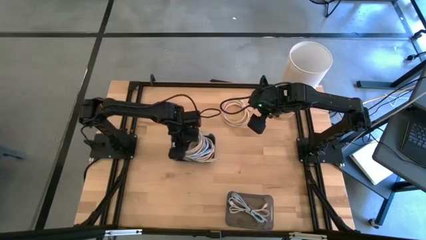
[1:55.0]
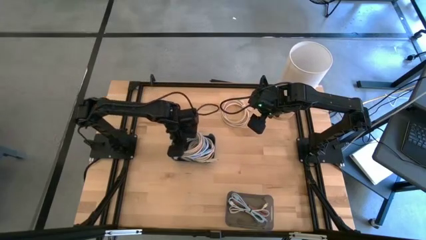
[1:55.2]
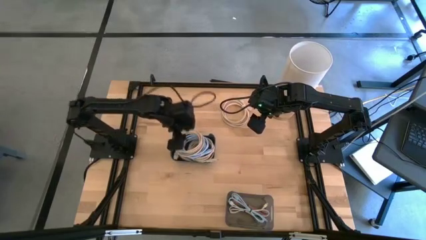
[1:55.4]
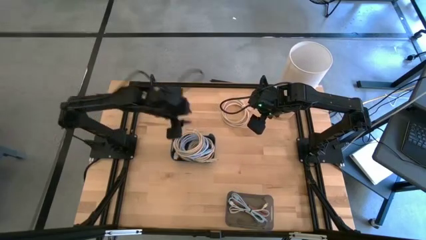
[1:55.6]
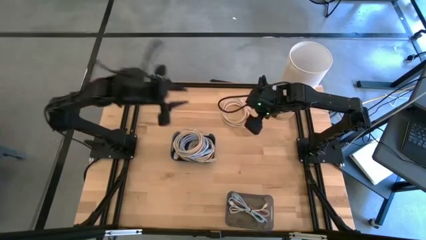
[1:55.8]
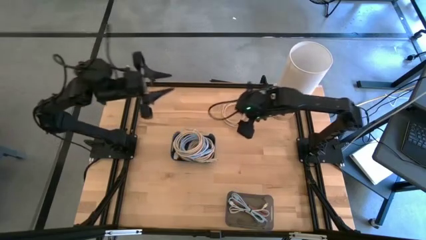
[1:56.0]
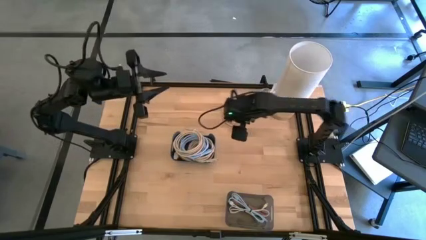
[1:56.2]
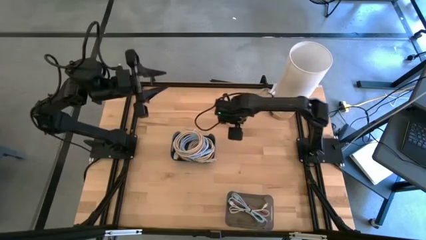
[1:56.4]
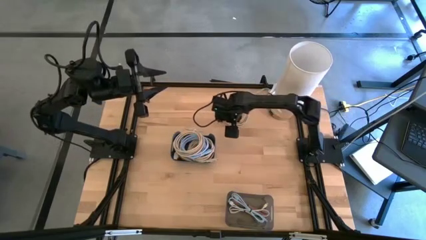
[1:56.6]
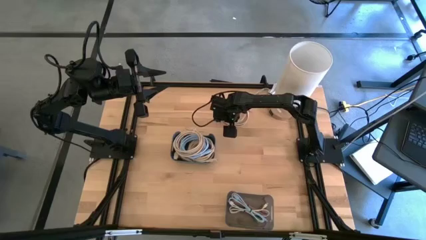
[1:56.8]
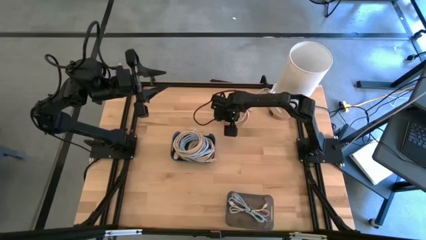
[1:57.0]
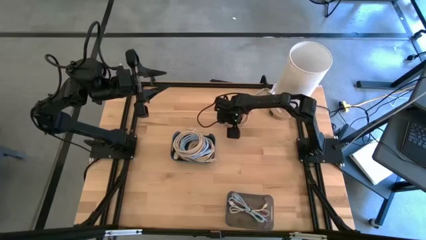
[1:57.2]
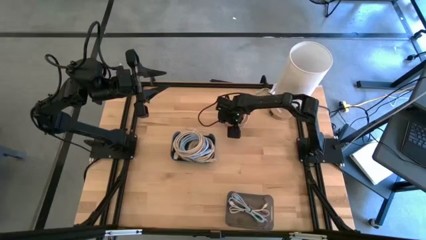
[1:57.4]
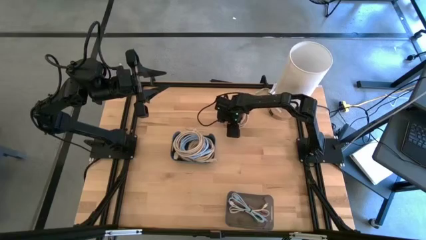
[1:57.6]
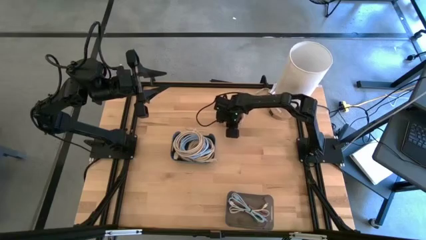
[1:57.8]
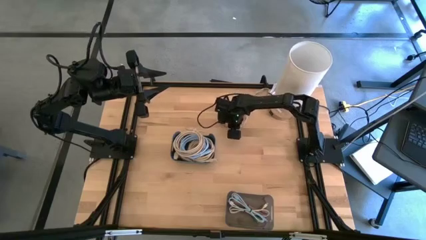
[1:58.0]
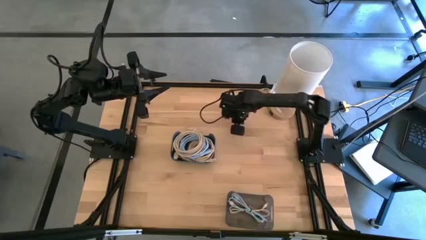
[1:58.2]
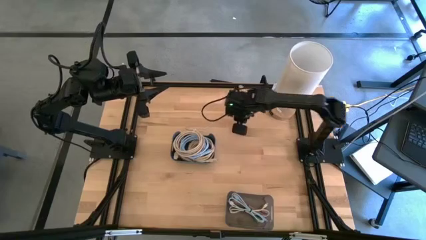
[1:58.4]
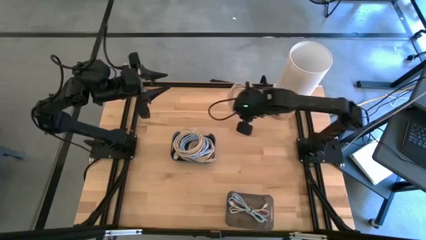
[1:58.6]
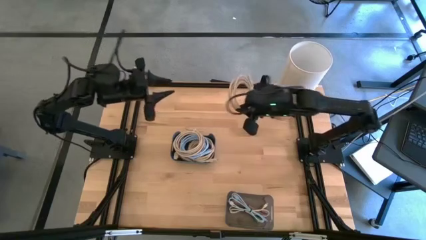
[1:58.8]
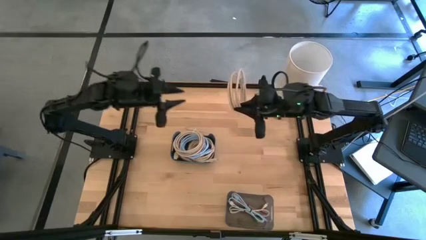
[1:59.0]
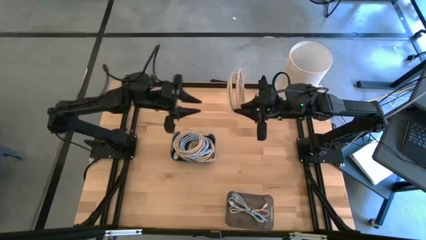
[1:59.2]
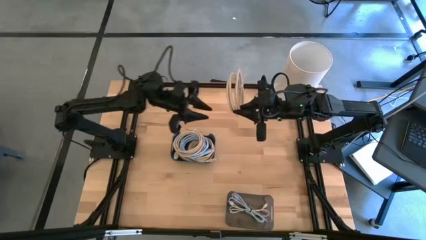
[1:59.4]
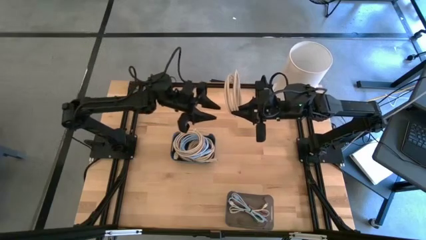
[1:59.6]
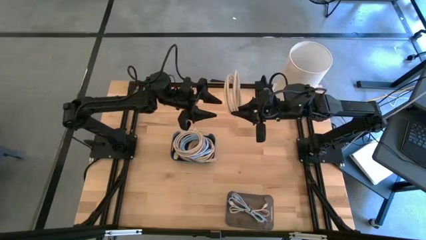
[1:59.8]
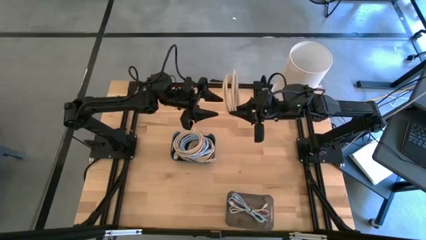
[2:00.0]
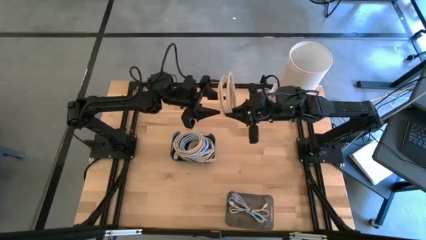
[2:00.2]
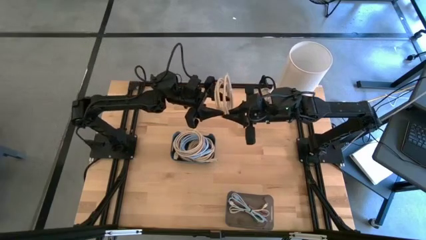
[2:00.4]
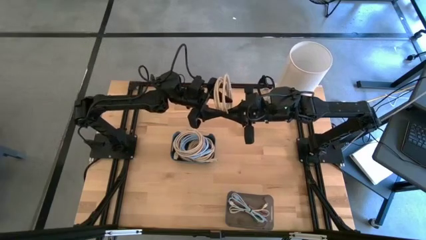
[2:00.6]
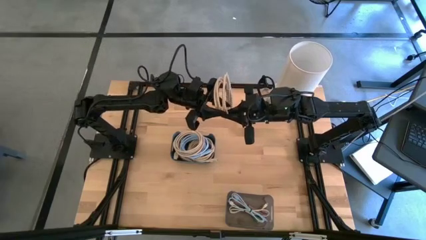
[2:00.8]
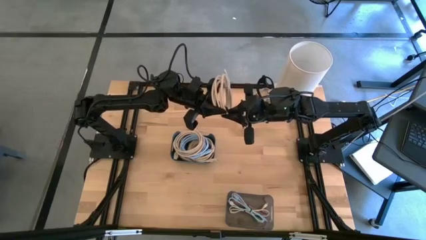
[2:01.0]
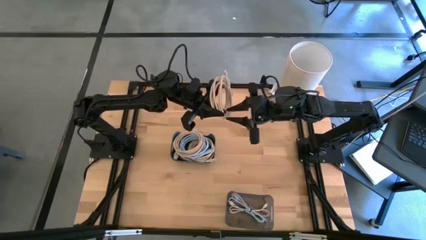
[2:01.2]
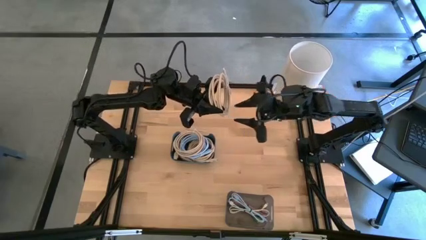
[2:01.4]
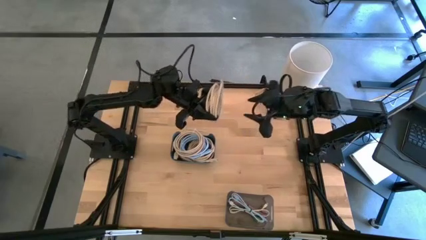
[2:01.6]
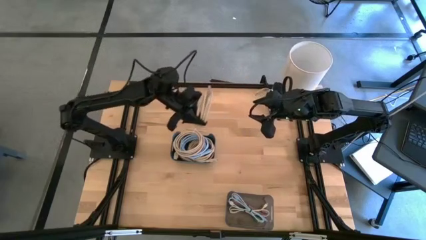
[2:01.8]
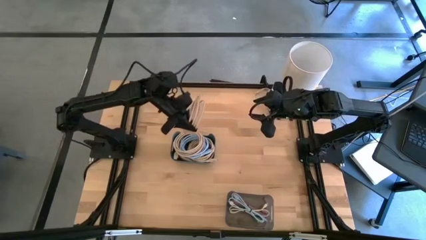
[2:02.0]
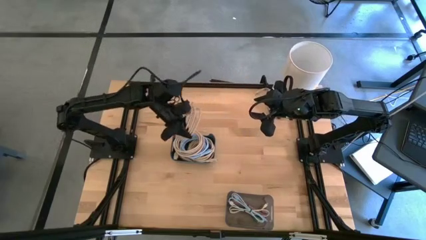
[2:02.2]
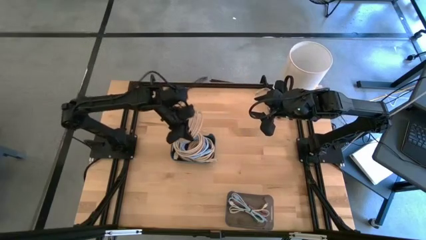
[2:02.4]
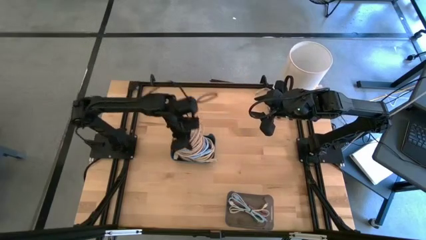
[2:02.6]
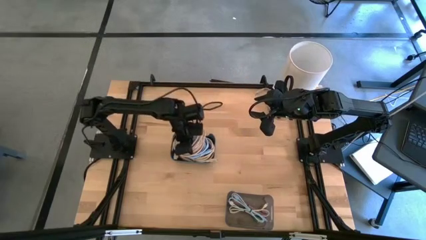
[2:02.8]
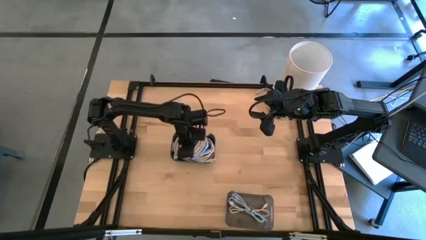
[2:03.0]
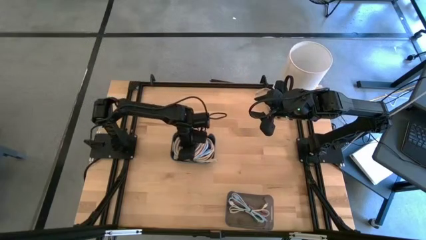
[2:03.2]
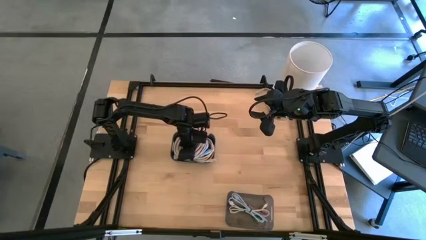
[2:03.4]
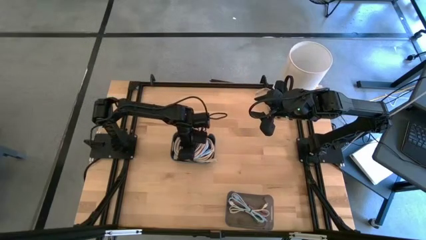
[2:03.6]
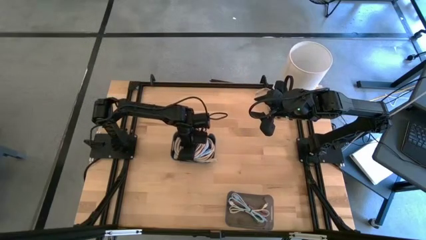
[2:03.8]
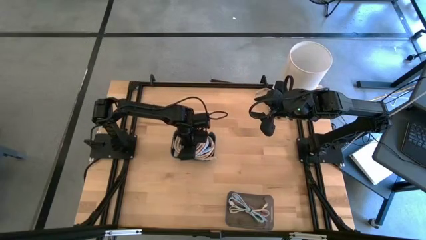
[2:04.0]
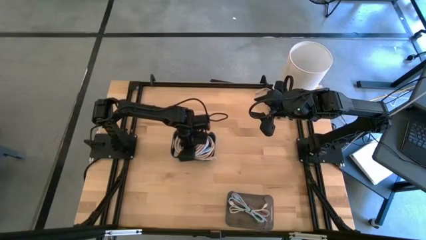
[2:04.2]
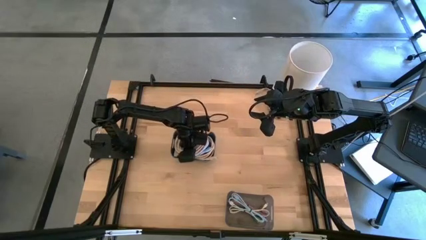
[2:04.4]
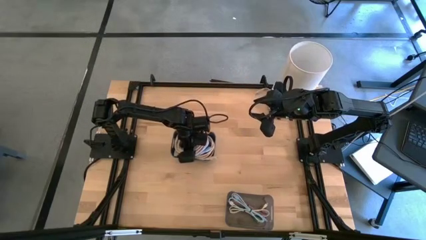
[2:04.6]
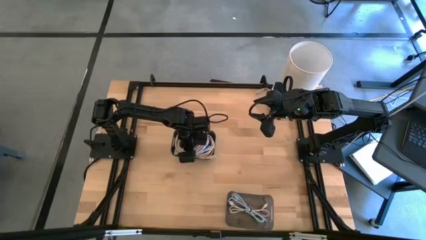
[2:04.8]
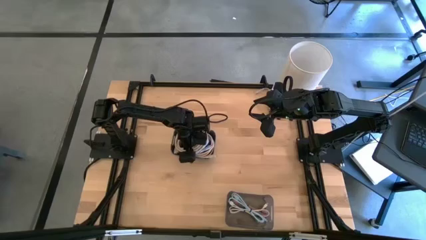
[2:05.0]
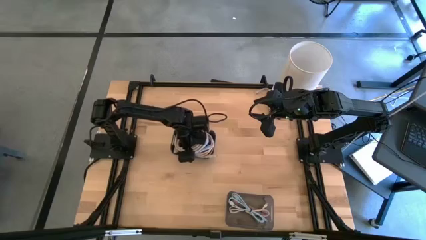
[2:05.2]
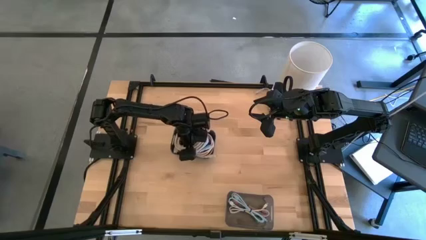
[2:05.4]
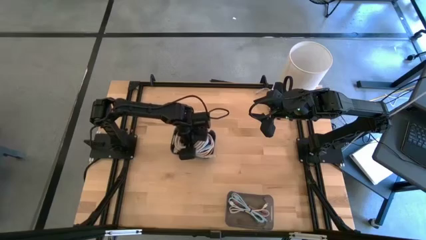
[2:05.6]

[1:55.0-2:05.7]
Put the brown HDMI cable into the blue bin

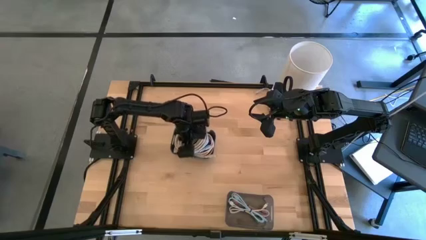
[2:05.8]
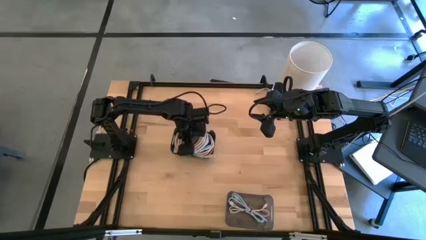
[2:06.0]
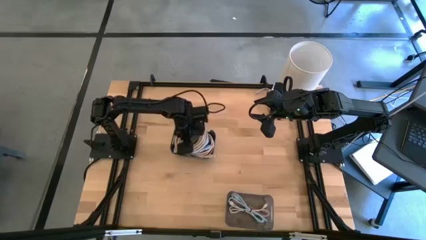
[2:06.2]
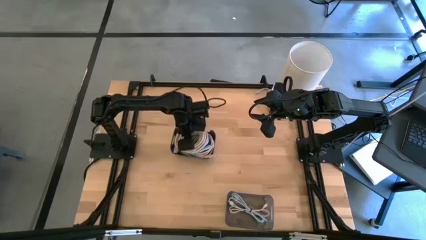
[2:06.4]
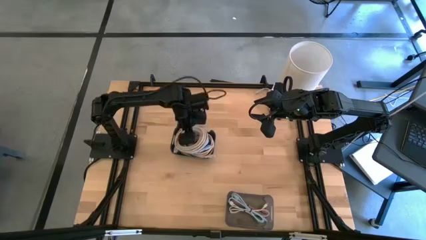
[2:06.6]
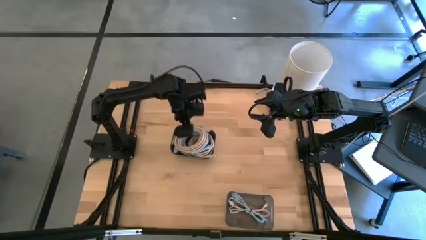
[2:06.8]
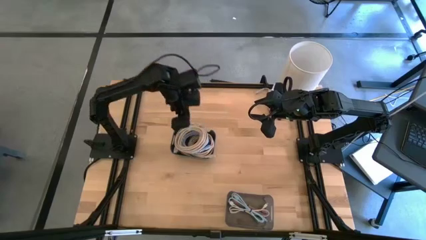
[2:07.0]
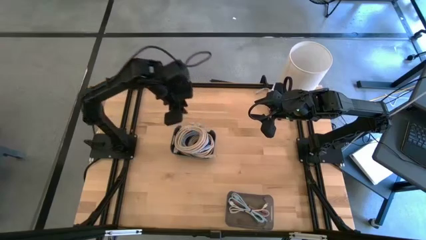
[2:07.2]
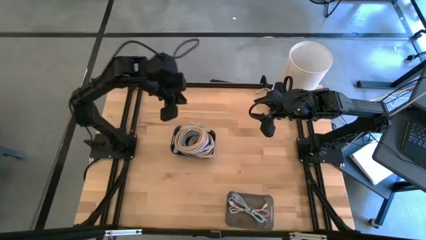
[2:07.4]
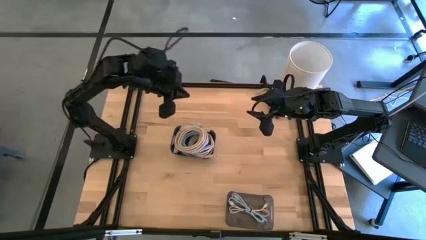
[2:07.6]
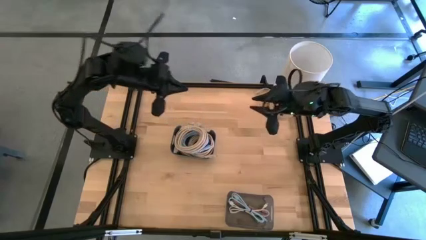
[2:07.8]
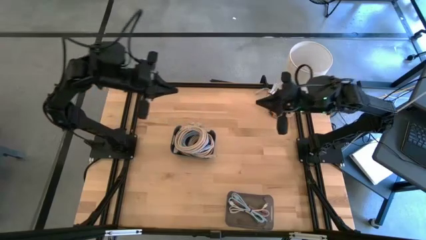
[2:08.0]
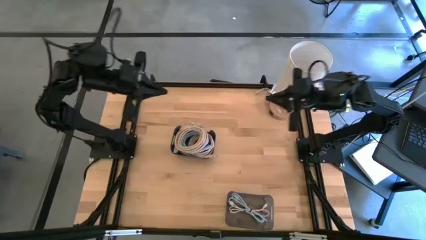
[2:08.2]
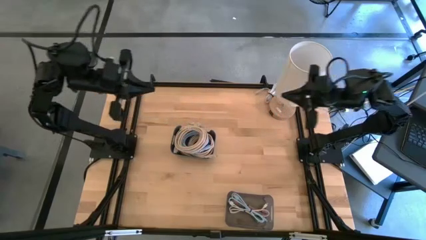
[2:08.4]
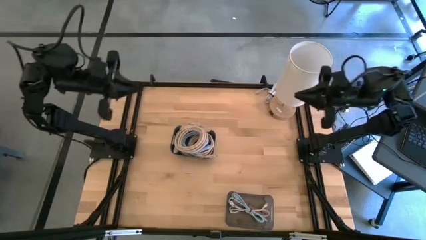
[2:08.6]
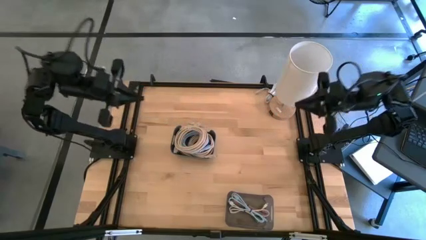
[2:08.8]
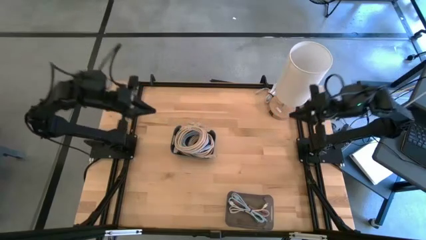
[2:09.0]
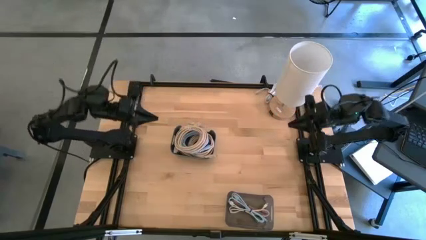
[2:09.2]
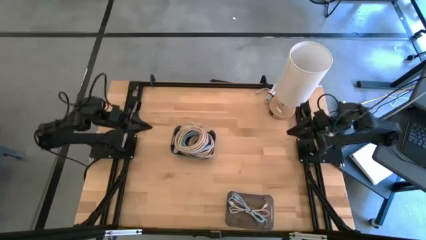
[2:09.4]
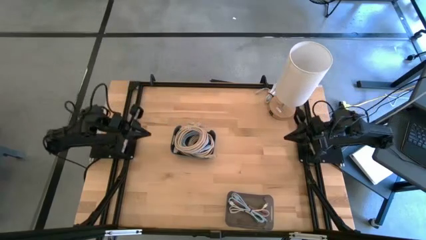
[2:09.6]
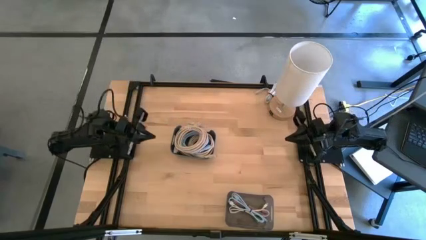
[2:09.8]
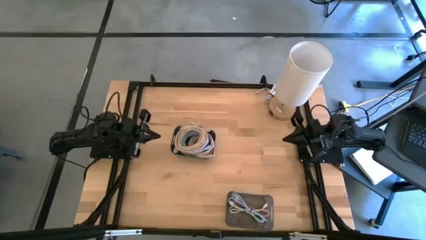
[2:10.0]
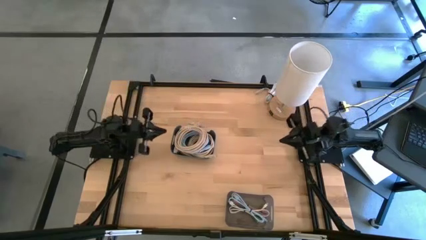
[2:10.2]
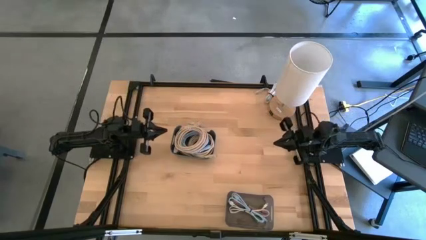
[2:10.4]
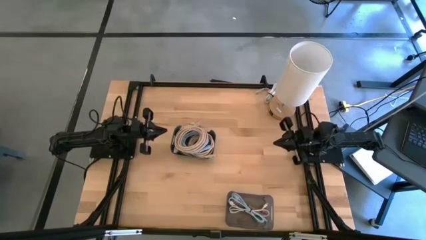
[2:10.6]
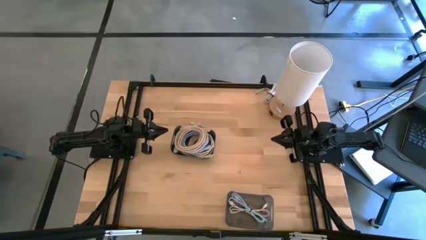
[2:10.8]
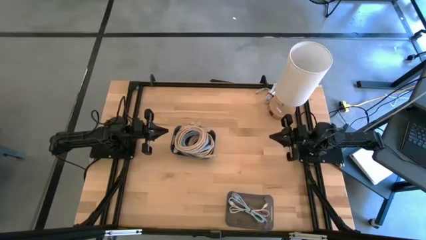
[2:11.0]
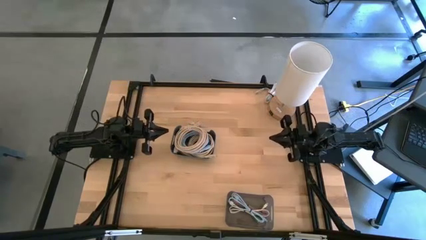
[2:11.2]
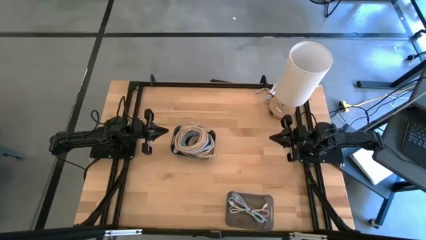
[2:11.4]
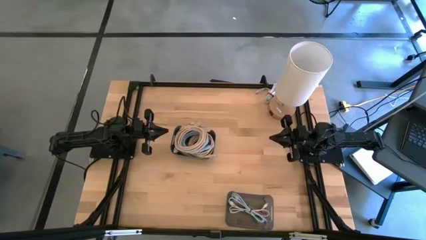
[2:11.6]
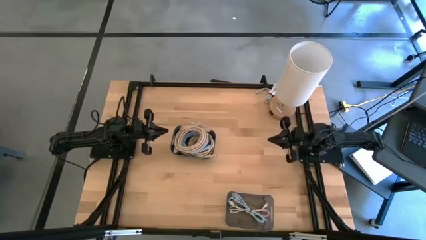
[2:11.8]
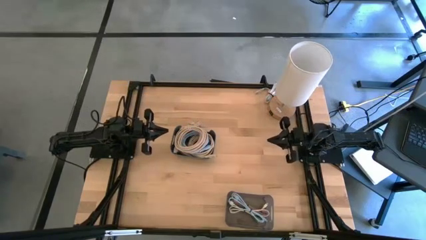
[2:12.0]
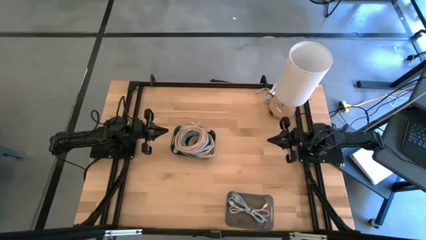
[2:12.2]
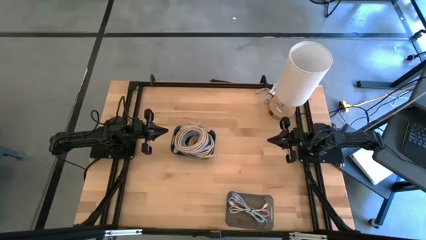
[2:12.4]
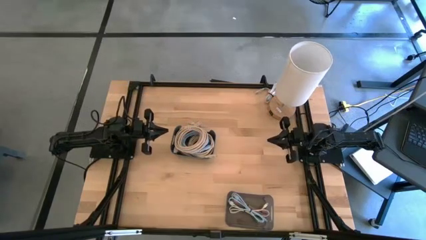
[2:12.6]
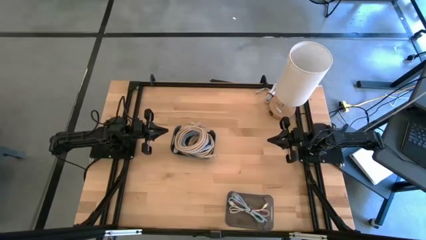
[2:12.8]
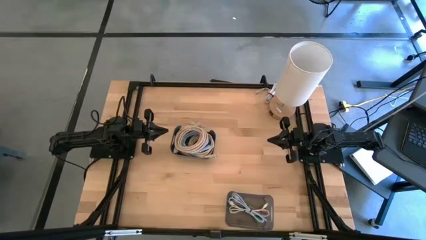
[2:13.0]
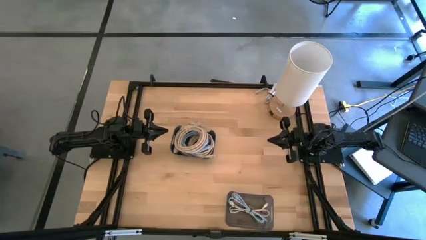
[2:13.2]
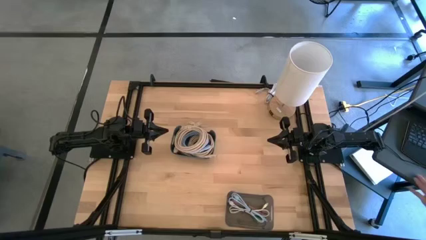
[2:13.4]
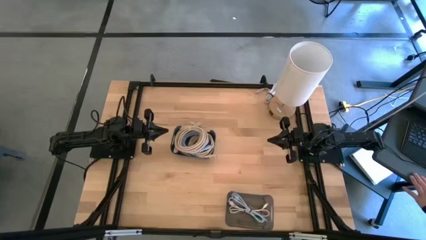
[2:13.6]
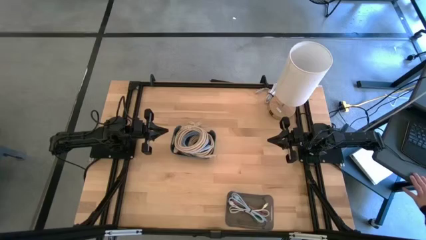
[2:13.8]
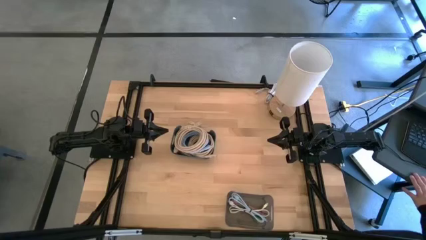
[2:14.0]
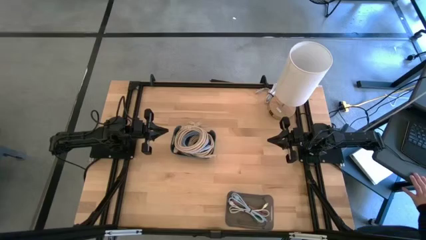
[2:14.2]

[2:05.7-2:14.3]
Return to Home Position
